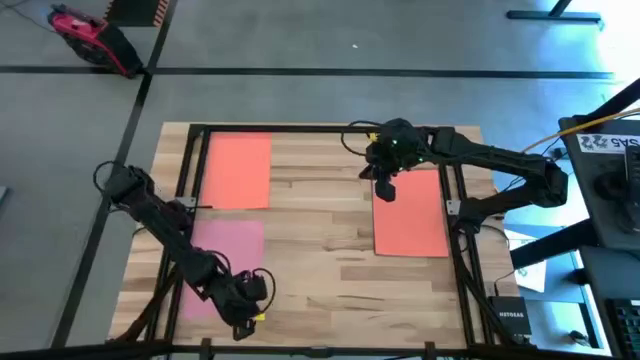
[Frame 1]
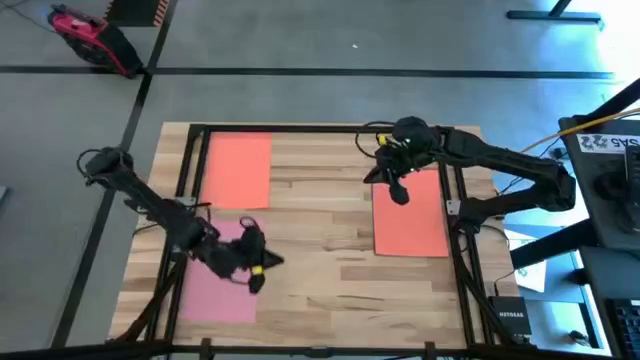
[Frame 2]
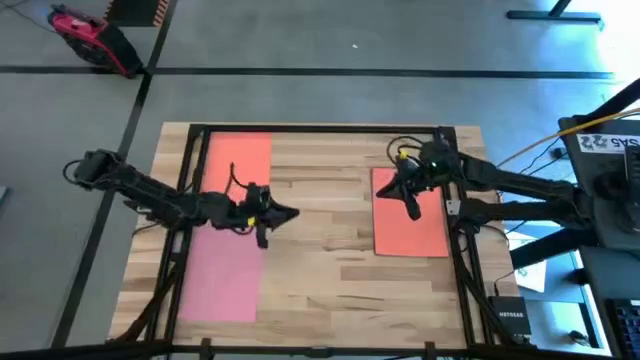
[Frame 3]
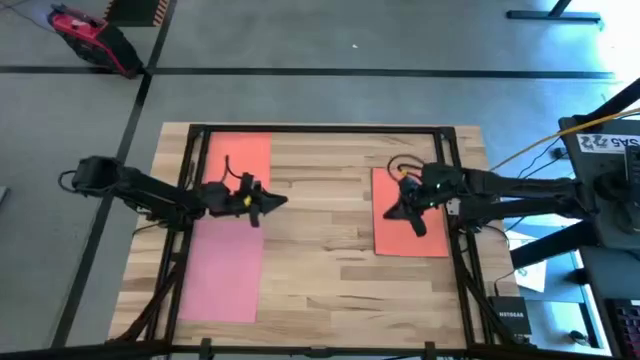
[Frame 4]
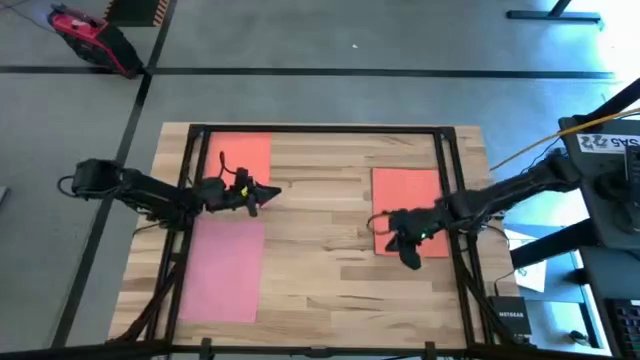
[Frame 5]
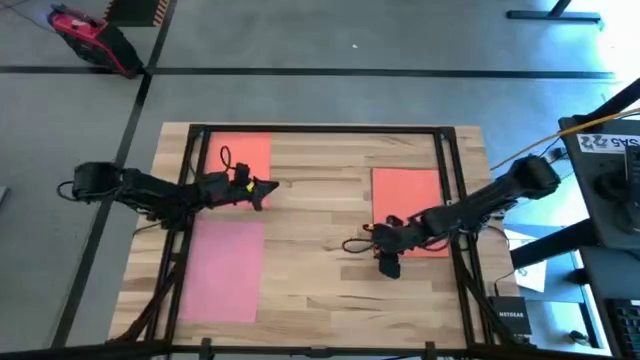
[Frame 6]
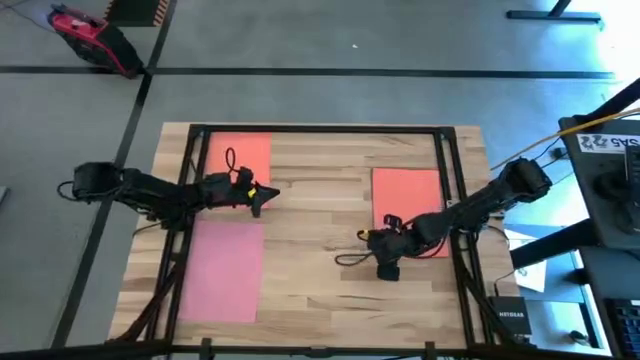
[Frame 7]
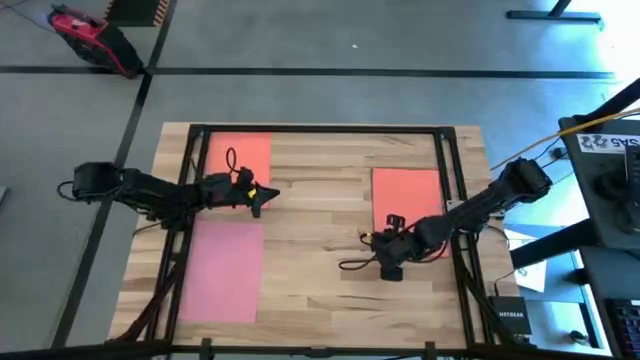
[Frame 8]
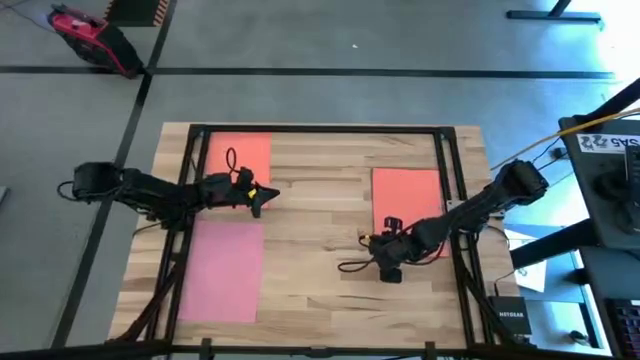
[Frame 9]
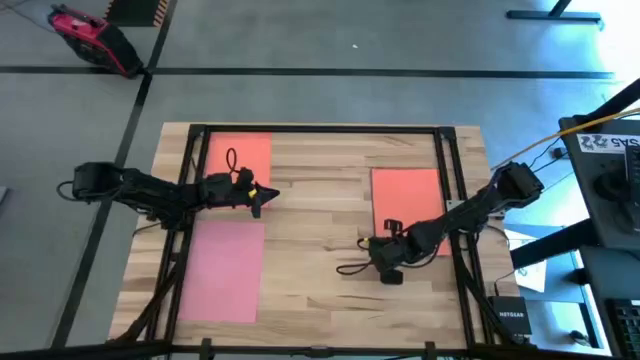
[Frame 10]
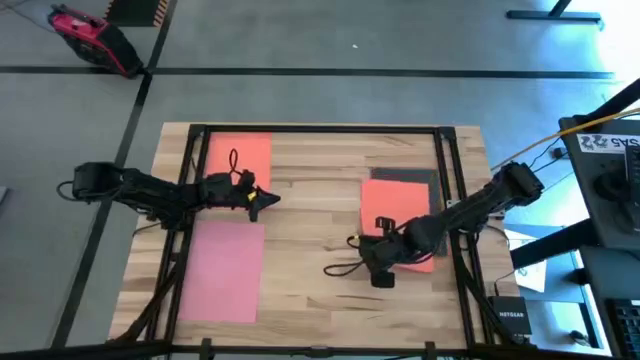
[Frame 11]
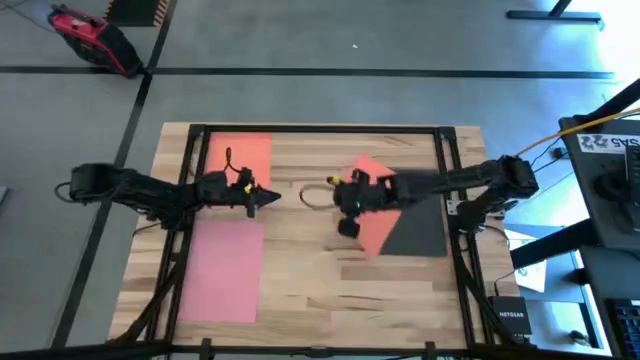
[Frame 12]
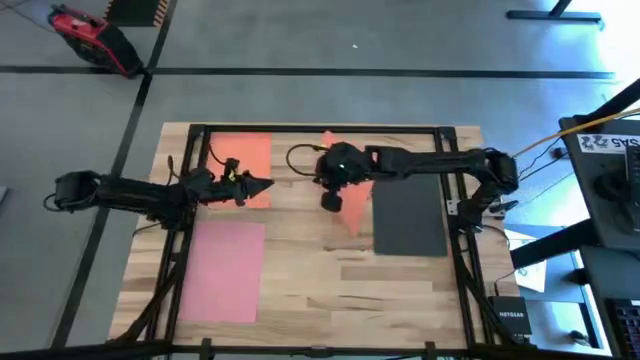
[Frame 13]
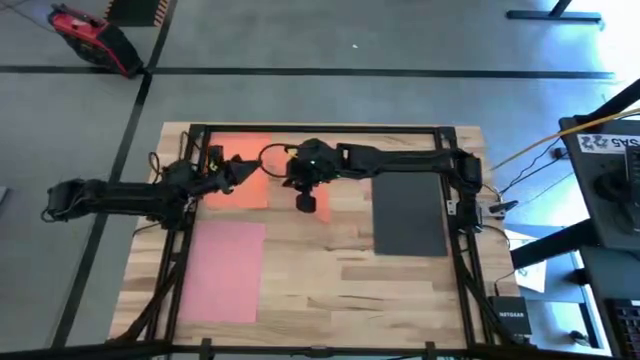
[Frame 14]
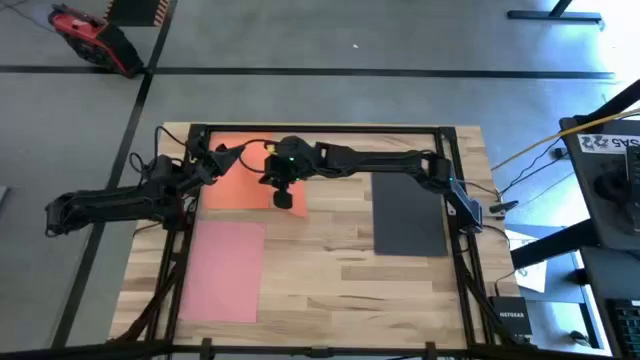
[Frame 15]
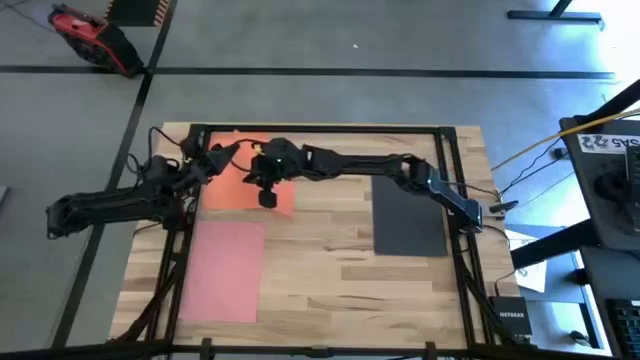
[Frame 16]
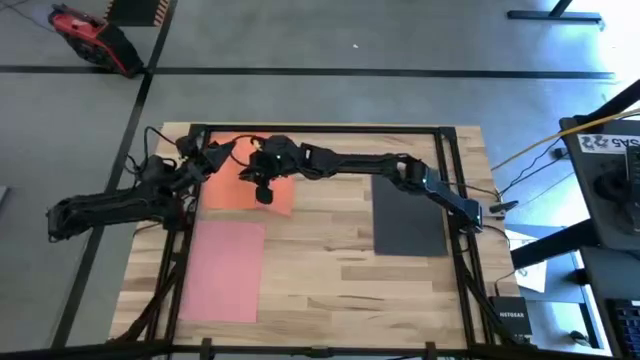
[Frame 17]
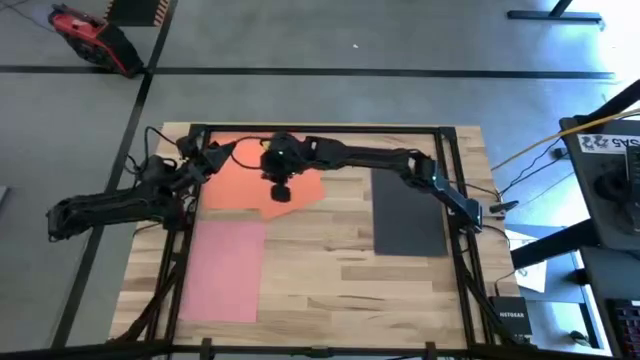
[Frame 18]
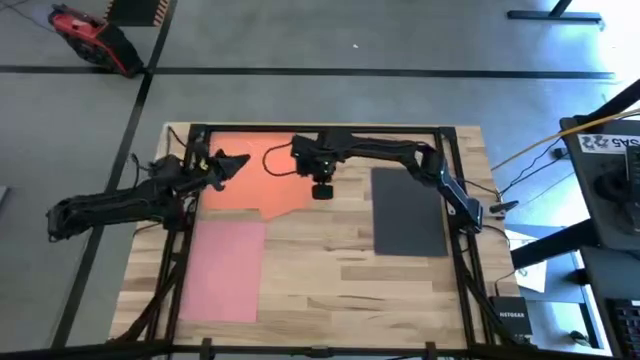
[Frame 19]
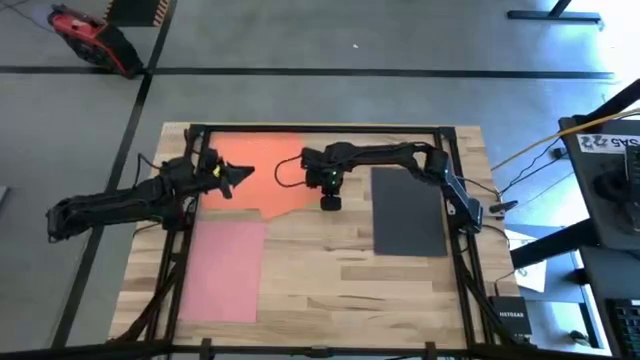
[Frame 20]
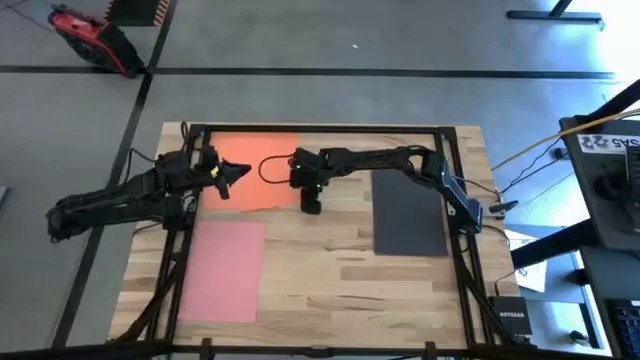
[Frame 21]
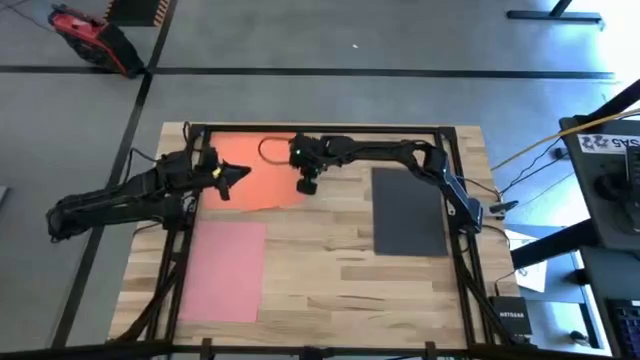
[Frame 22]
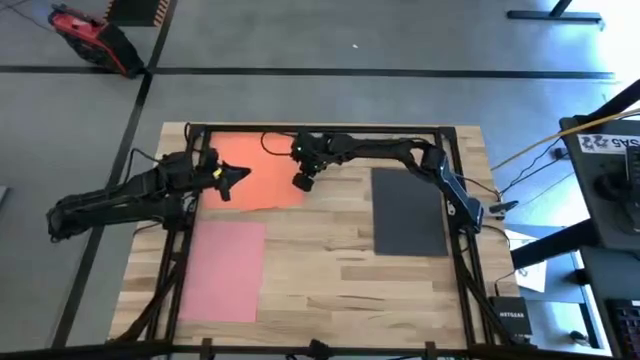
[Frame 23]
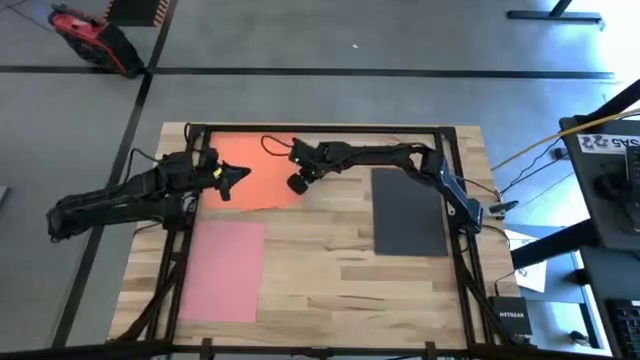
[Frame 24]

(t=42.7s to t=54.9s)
Task: Organize paper
Stack the orange color paper on top of the other orange color paper

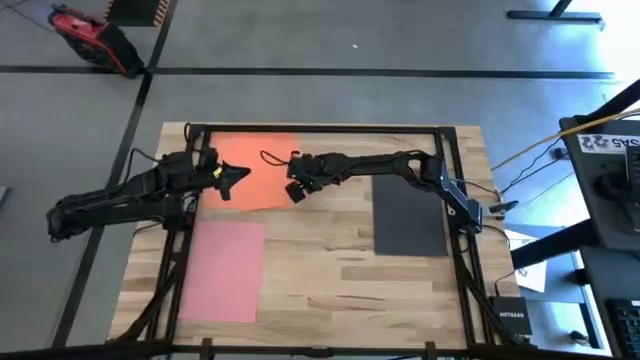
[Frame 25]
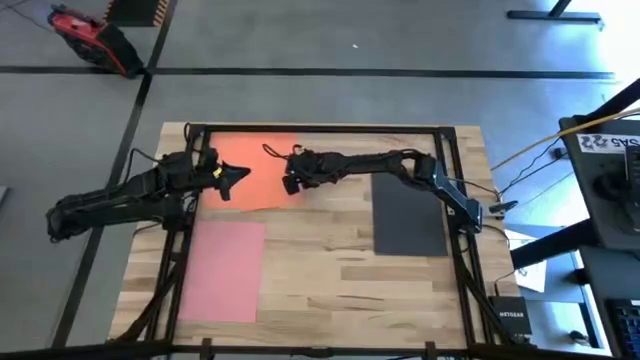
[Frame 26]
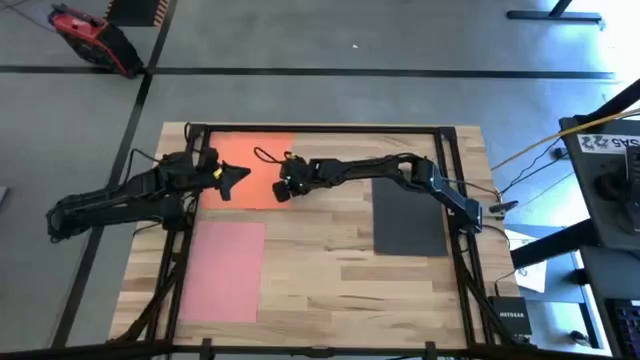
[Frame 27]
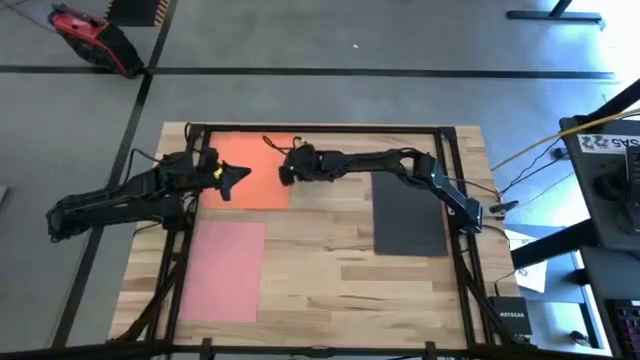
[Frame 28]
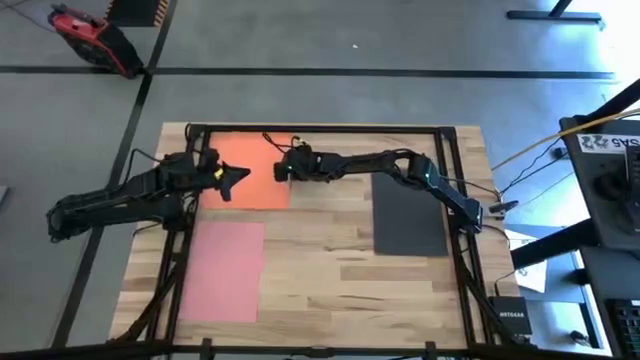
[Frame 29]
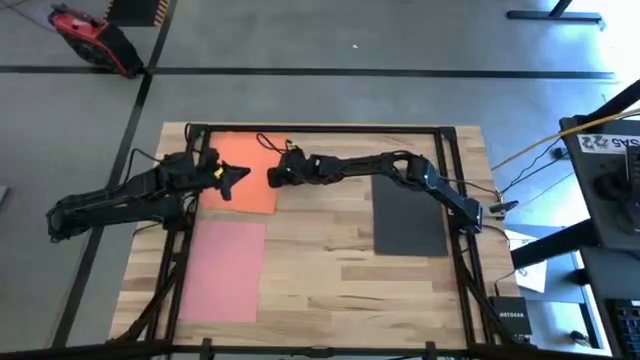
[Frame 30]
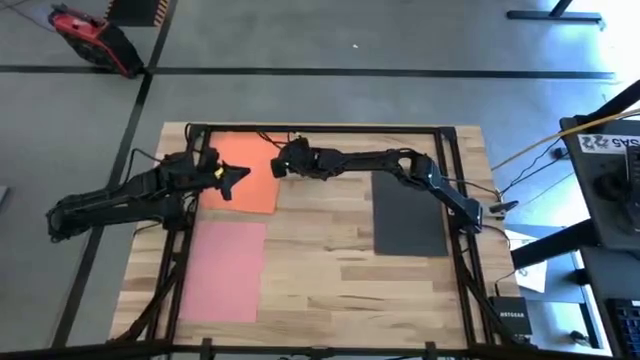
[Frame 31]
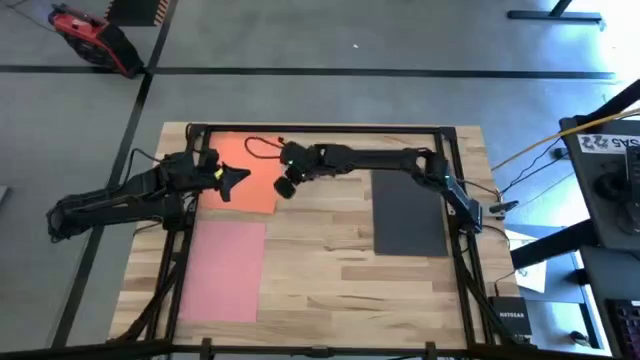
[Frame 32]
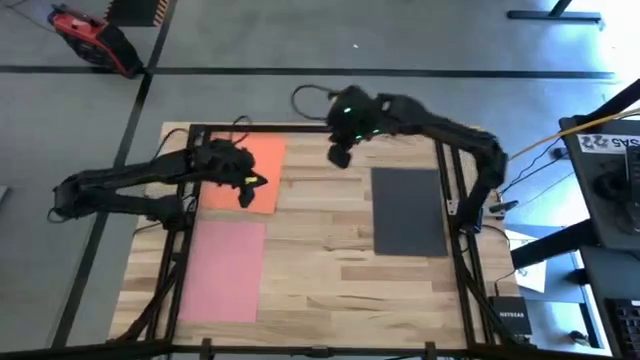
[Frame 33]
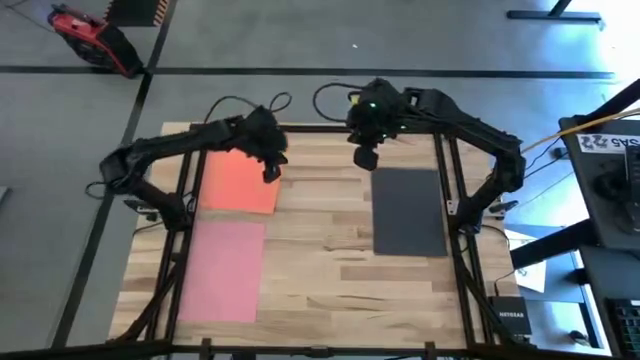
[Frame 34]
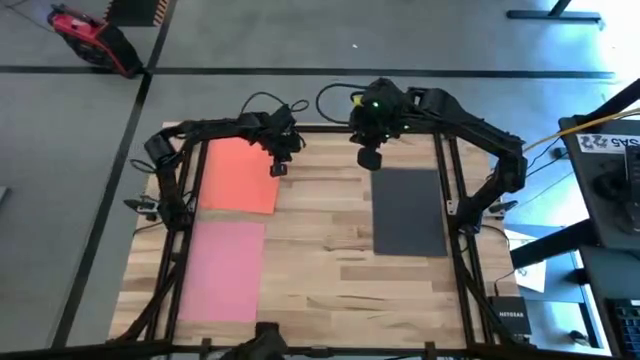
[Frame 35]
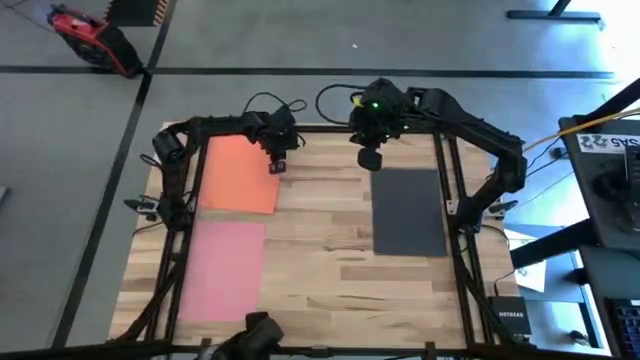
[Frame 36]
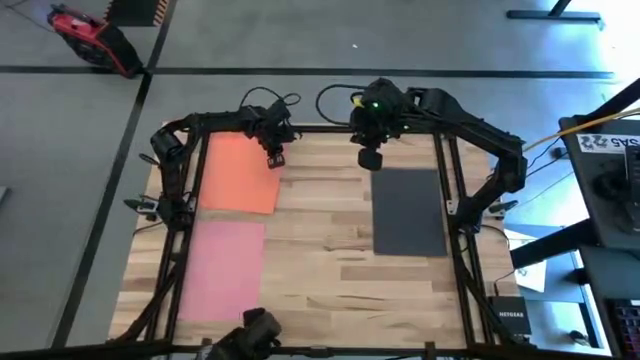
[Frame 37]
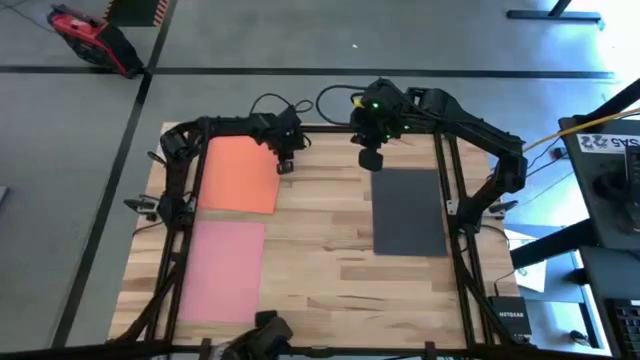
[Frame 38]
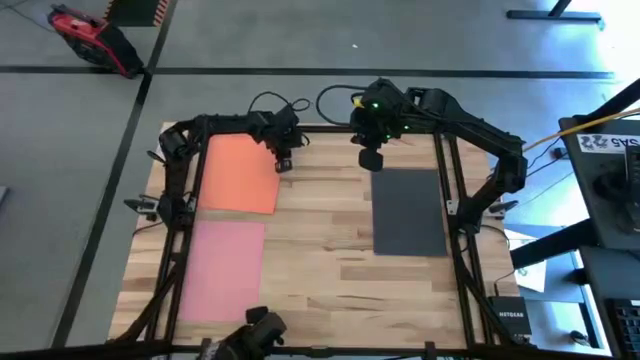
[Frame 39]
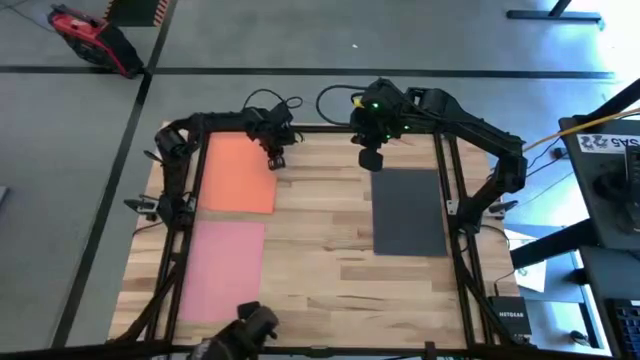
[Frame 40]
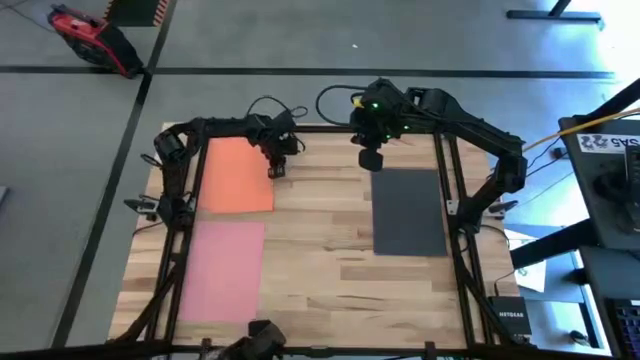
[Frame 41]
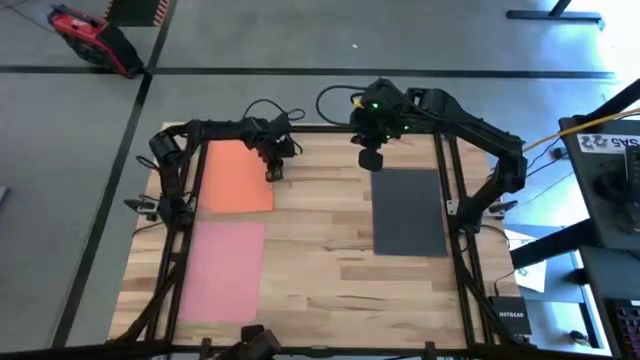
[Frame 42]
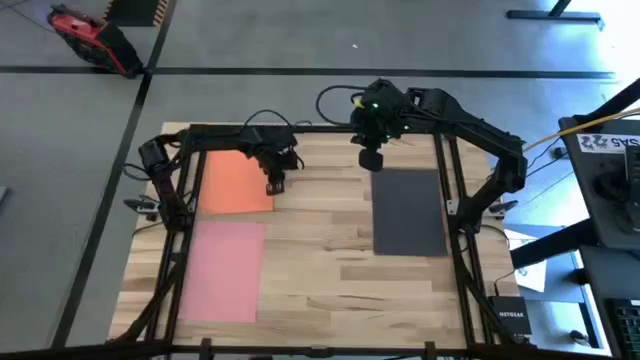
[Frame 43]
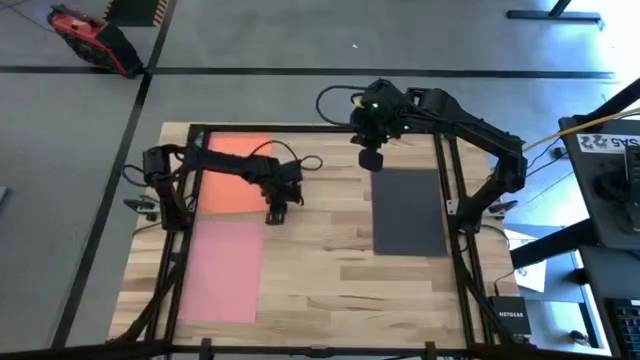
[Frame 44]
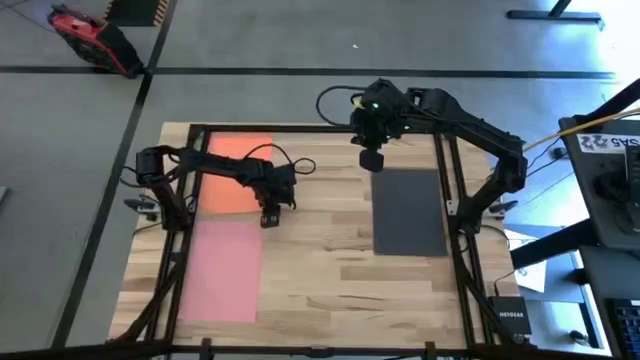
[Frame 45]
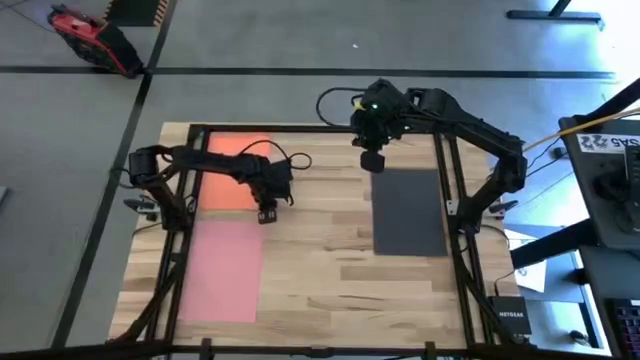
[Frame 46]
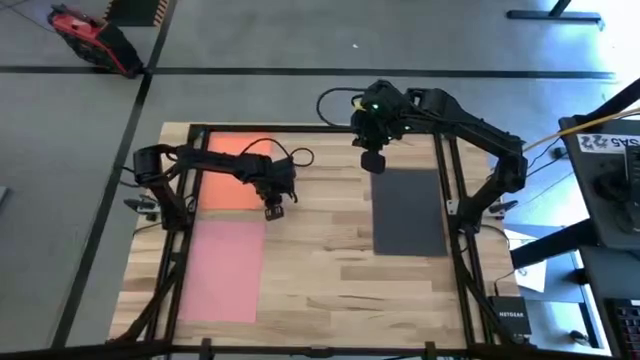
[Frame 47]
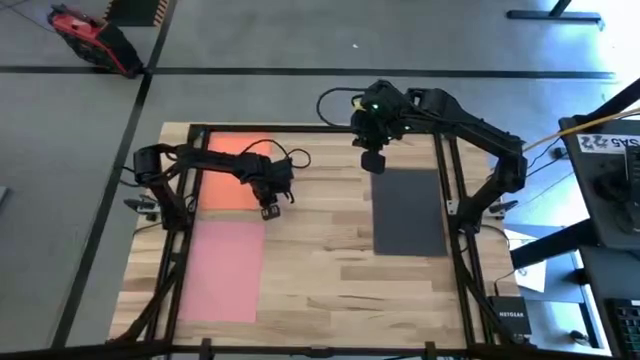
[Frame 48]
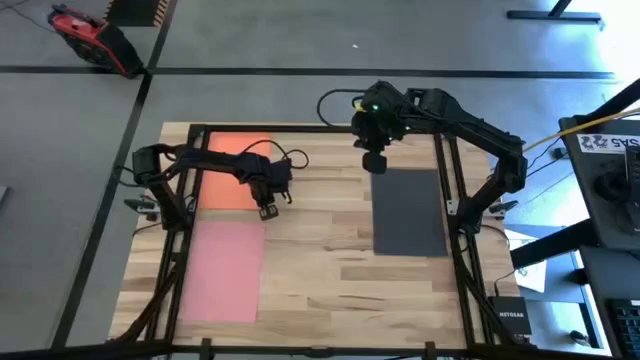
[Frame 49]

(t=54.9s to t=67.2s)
Stack the orange color paper on top of the other orange color paper
